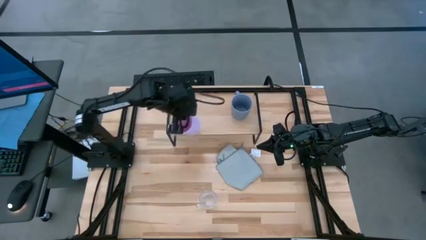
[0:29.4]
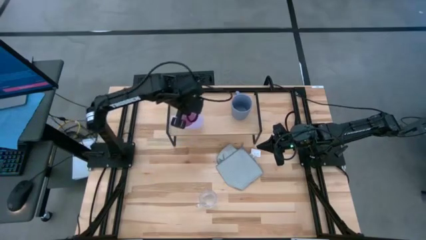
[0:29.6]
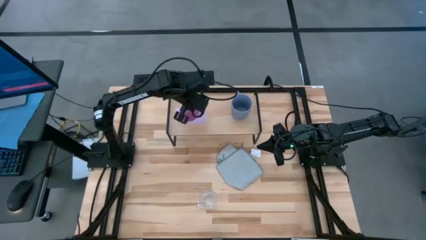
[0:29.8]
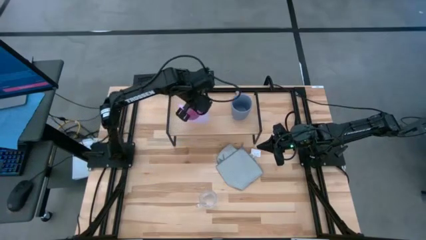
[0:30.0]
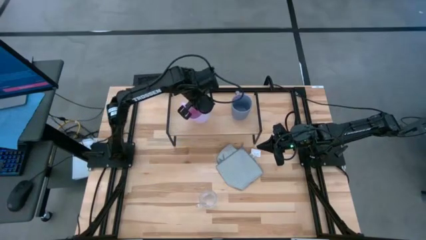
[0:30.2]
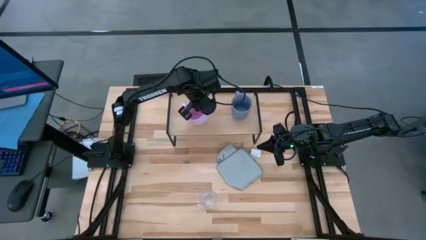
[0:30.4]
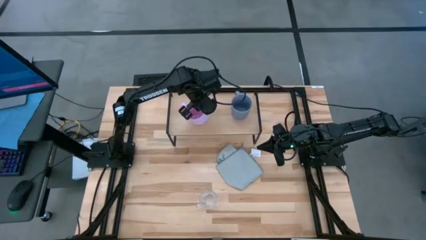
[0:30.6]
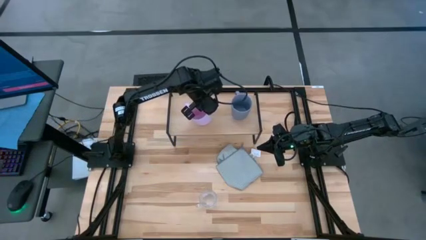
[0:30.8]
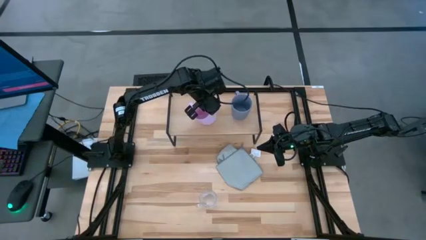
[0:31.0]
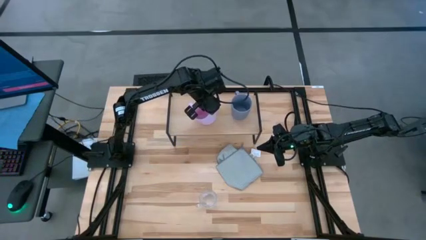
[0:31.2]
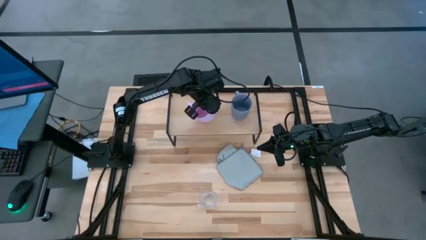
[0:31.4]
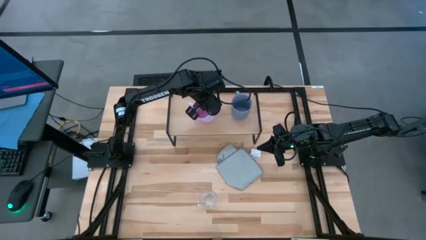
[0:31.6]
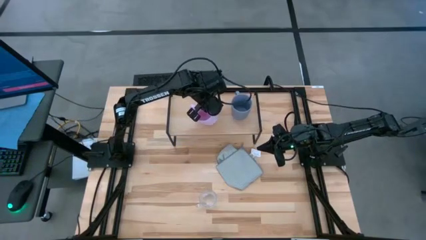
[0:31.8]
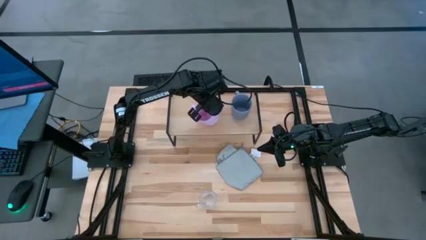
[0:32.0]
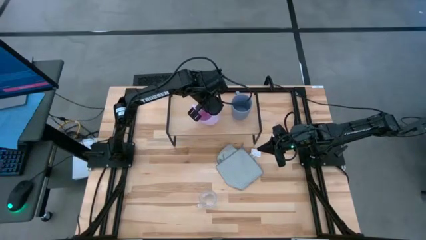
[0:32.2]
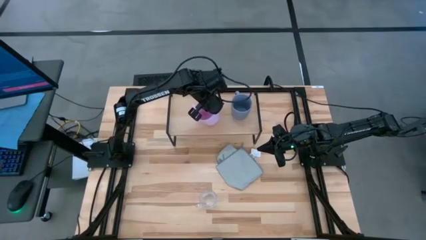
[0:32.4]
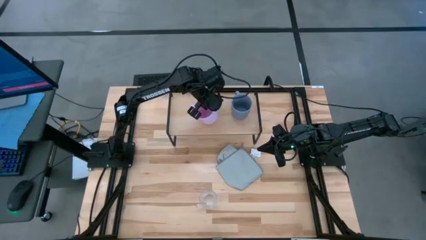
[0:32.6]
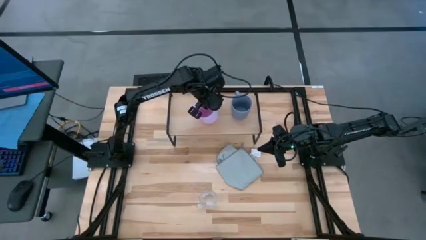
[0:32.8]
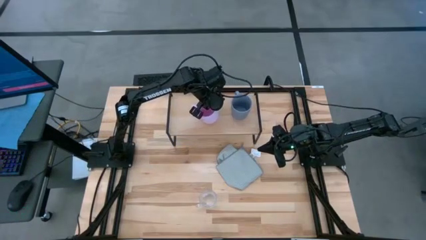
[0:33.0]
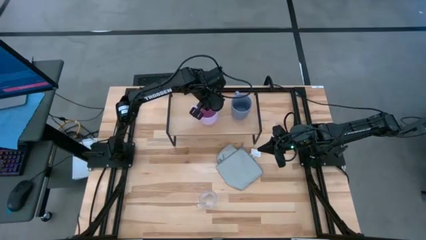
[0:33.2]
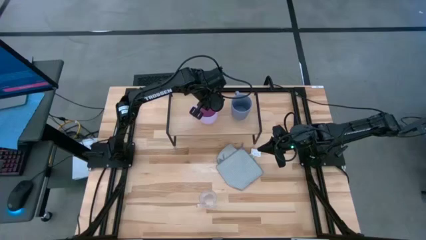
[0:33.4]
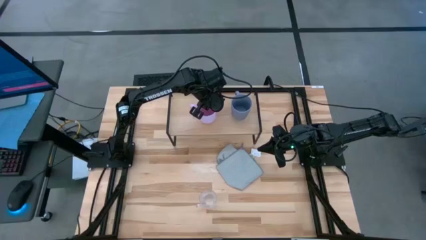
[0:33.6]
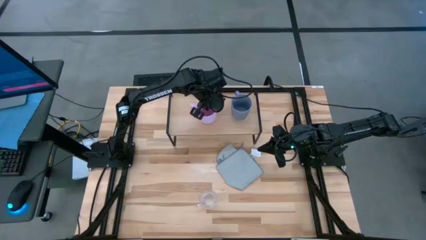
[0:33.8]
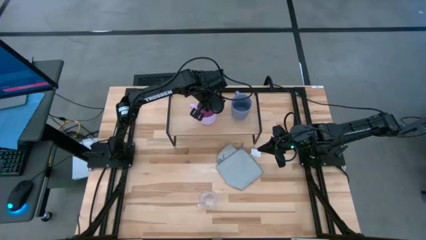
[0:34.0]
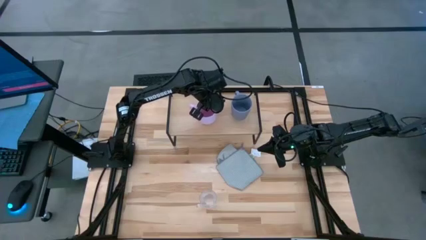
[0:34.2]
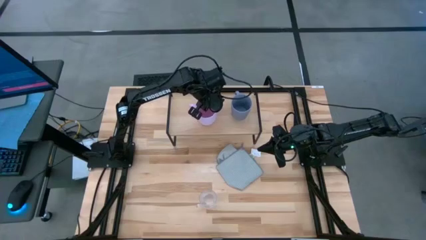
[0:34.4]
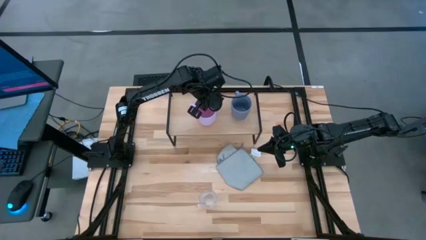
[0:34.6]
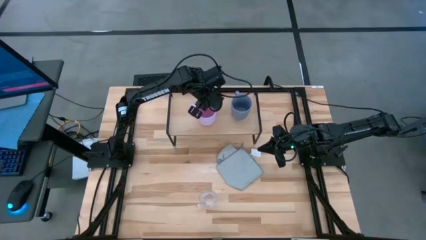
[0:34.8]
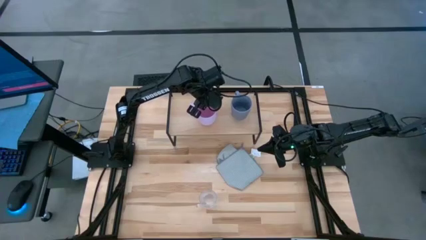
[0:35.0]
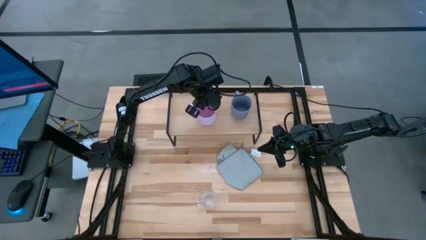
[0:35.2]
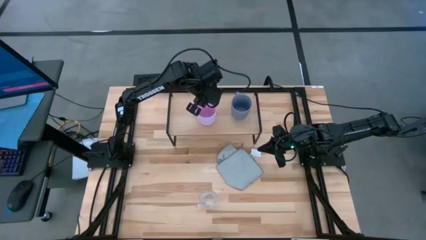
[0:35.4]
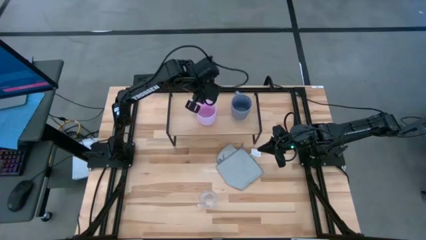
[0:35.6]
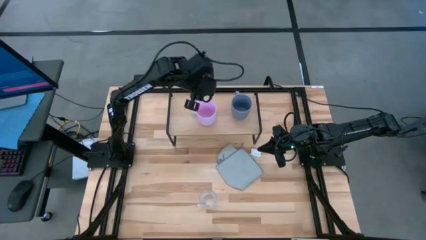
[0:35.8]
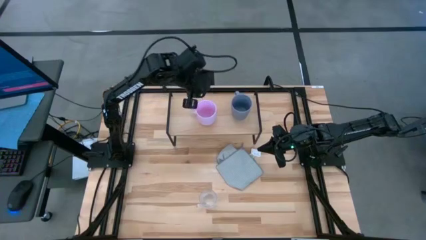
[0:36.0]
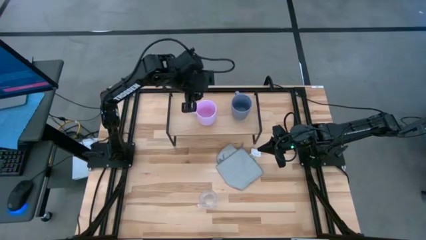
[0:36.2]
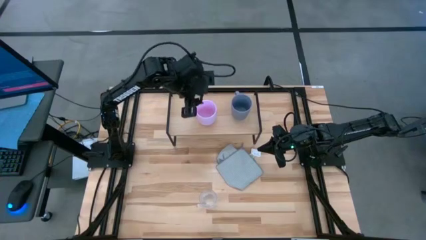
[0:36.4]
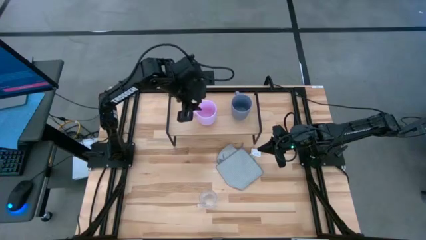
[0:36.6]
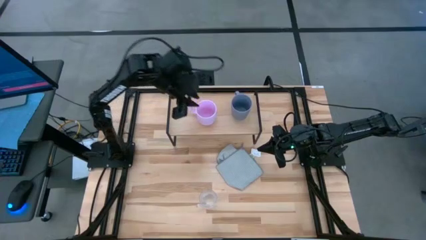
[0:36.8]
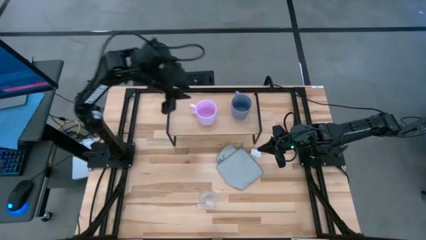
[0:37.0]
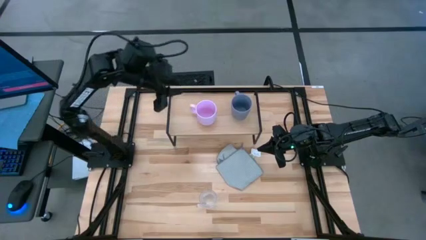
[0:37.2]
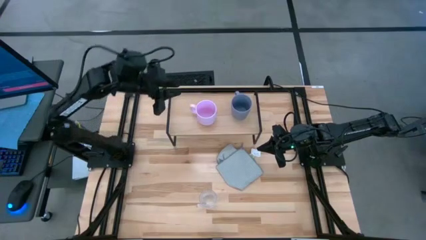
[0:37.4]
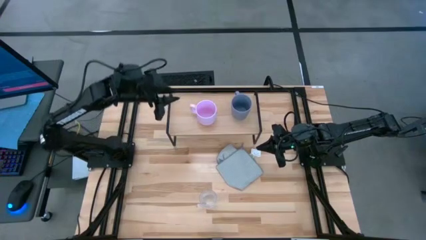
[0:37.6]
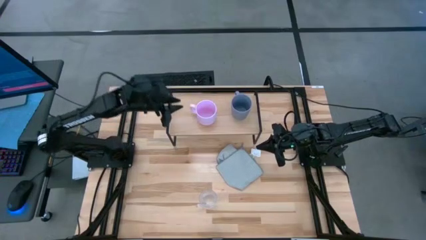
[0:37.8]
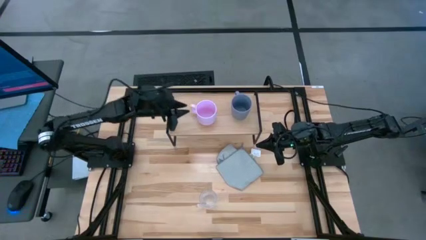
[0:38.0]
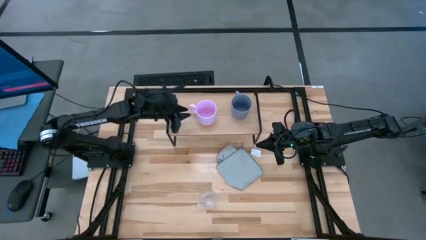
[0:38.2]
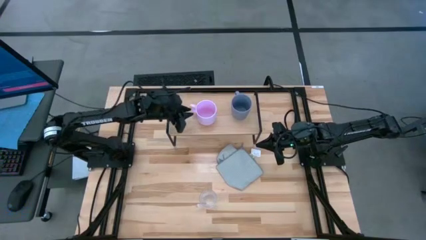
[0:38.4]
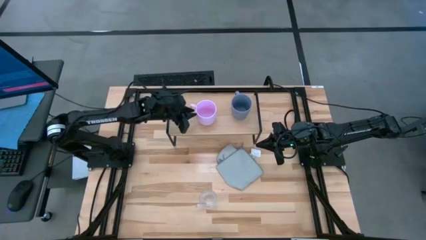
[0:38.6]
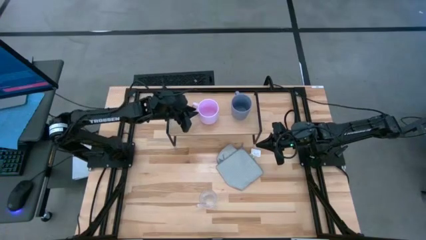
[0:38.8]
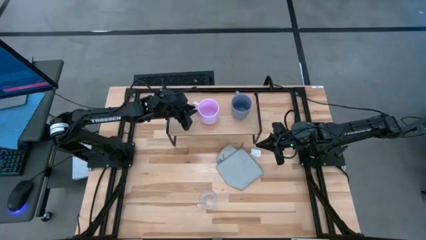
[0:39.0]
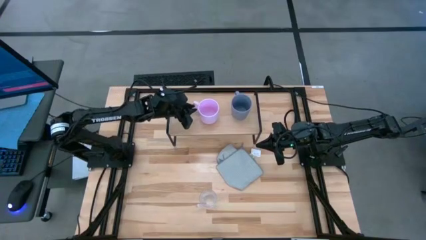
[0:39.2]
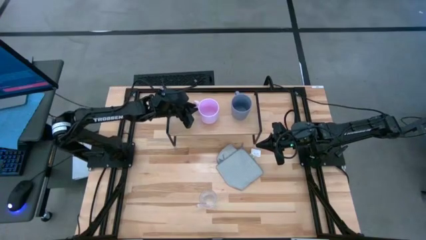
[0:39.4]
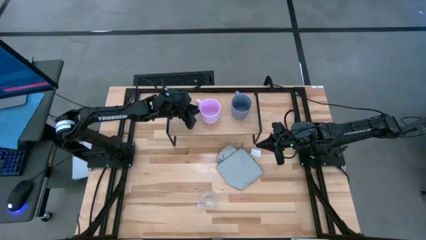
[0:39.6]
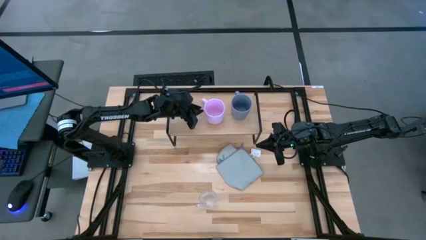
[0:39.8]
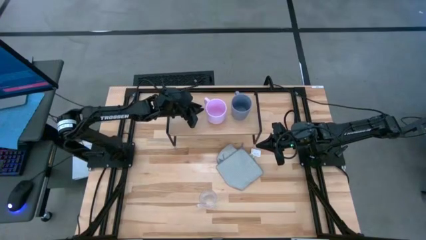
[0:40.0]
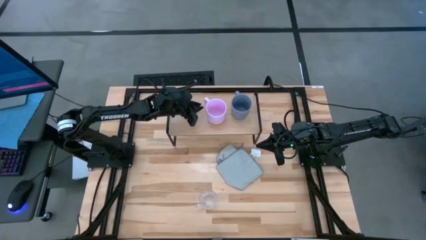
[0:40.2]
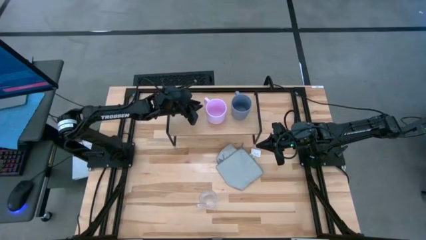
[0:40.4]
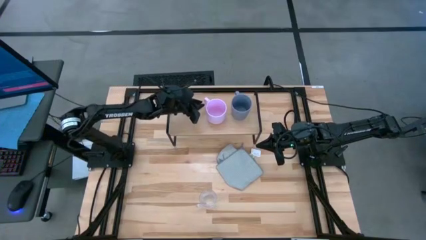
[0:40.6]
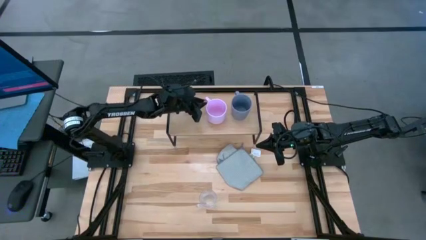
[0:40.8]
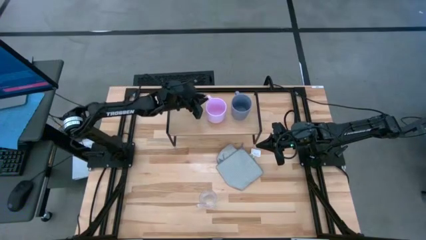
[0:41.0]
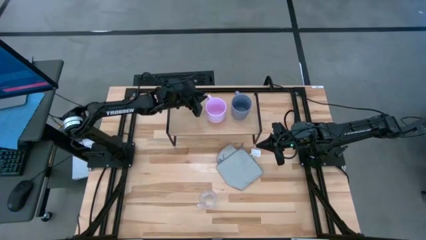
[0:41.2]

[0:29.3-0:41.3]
Task: Stack small to large cups/mugs on shelf
Put the pink mug on the shelf
